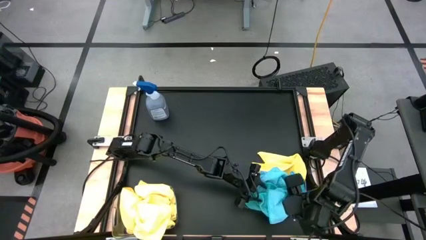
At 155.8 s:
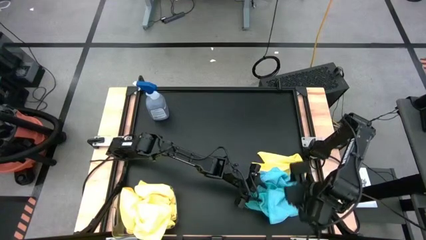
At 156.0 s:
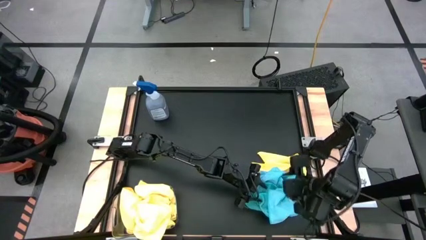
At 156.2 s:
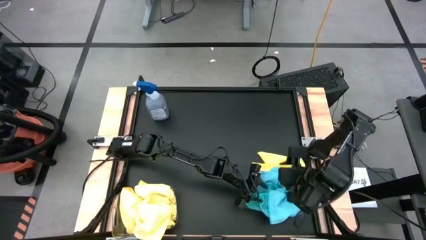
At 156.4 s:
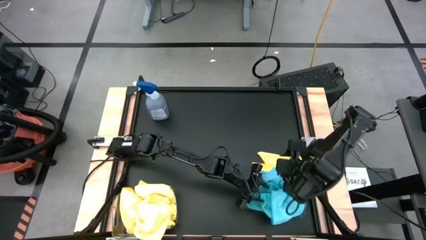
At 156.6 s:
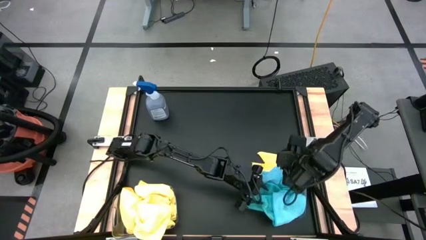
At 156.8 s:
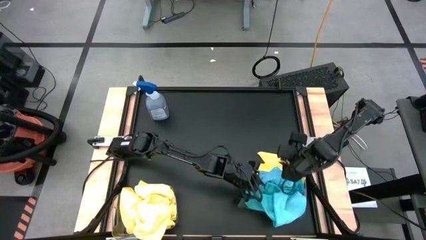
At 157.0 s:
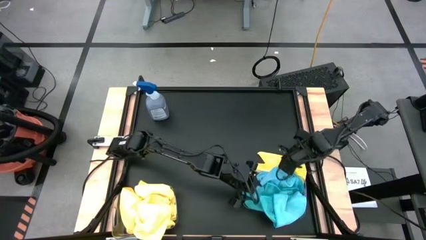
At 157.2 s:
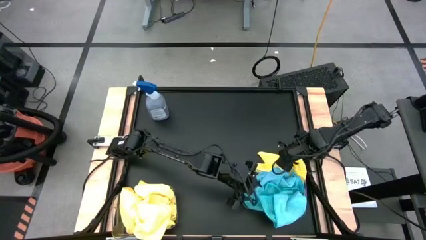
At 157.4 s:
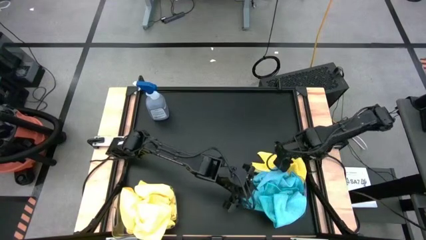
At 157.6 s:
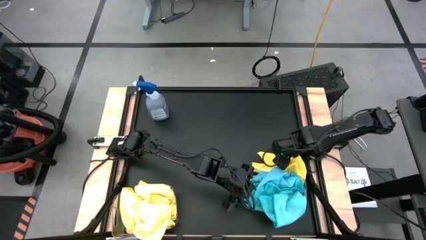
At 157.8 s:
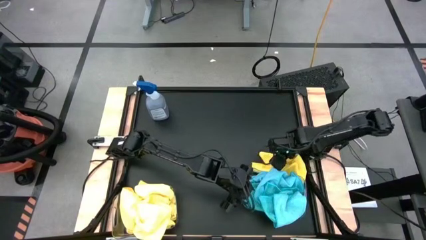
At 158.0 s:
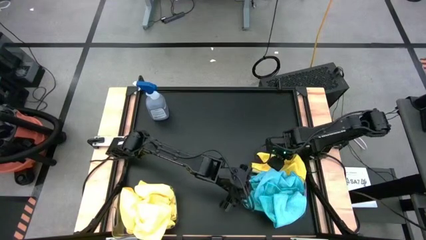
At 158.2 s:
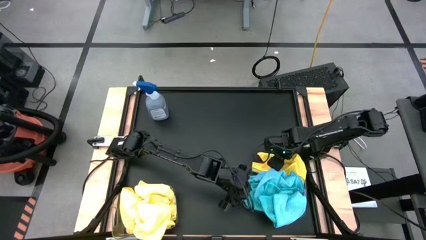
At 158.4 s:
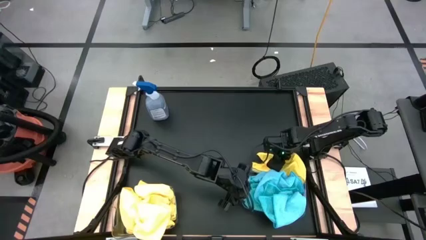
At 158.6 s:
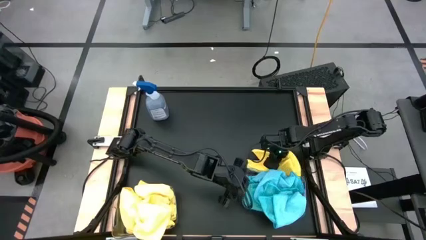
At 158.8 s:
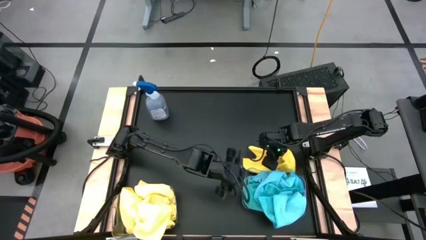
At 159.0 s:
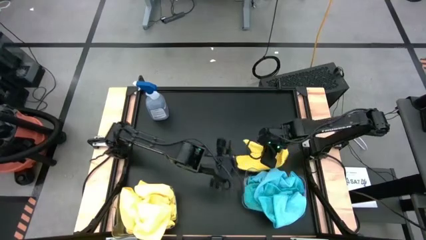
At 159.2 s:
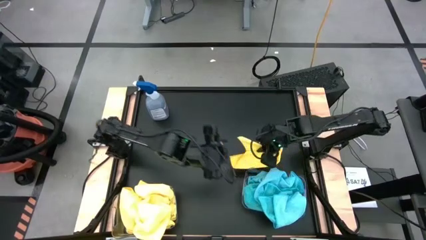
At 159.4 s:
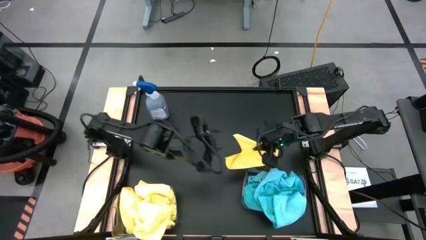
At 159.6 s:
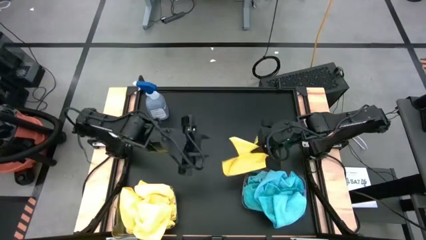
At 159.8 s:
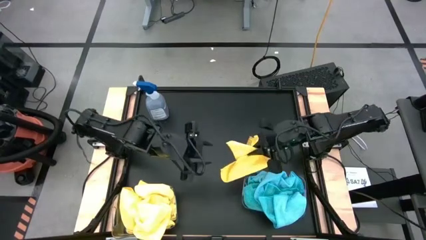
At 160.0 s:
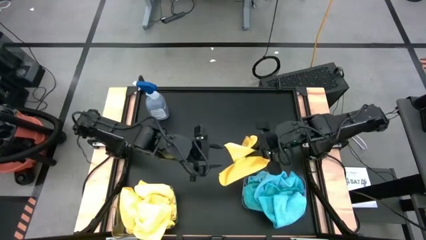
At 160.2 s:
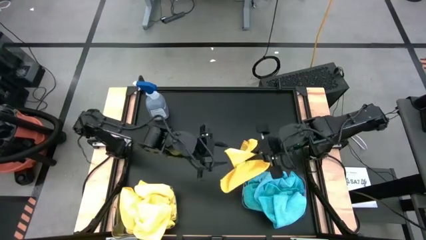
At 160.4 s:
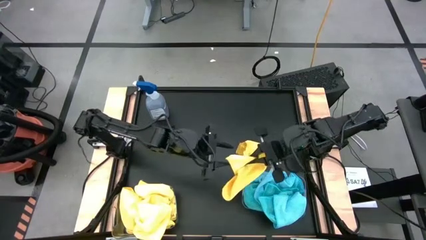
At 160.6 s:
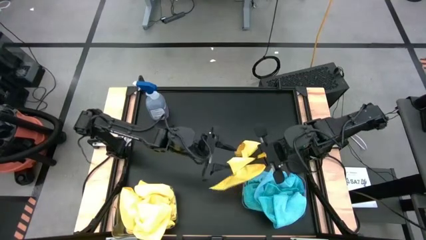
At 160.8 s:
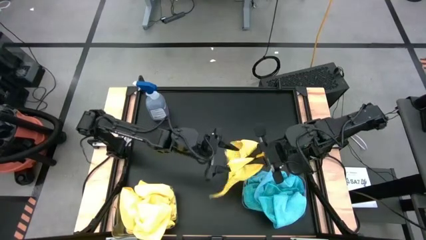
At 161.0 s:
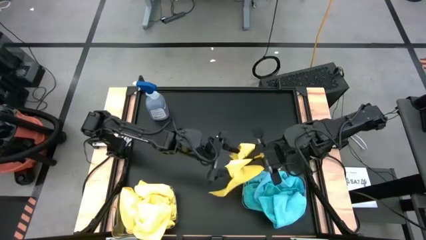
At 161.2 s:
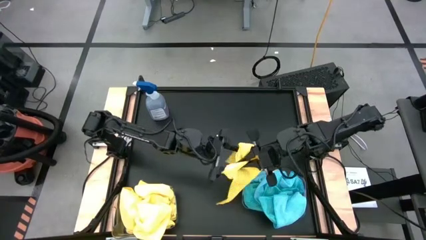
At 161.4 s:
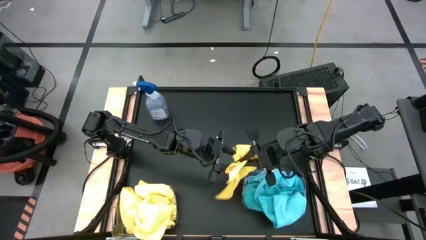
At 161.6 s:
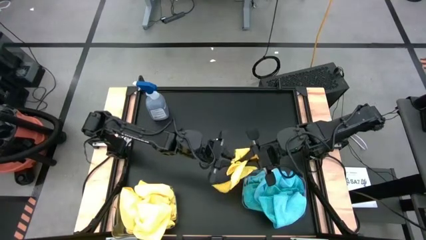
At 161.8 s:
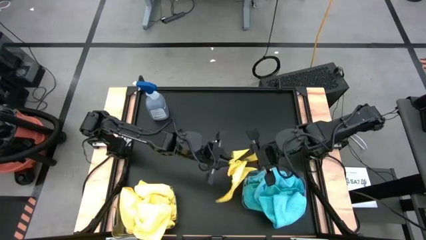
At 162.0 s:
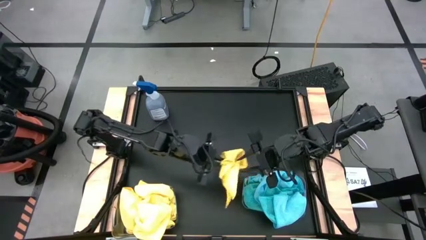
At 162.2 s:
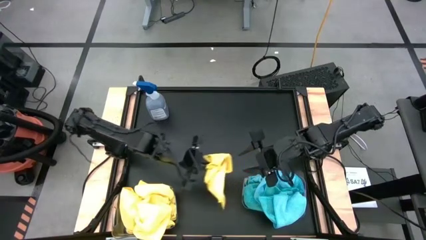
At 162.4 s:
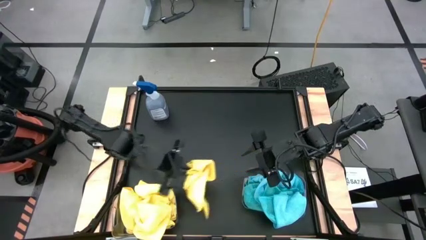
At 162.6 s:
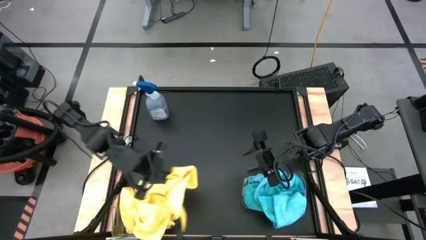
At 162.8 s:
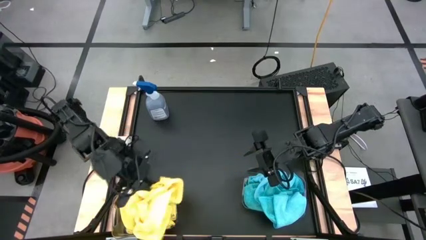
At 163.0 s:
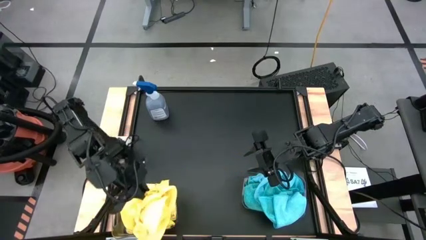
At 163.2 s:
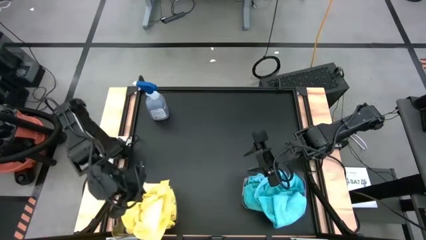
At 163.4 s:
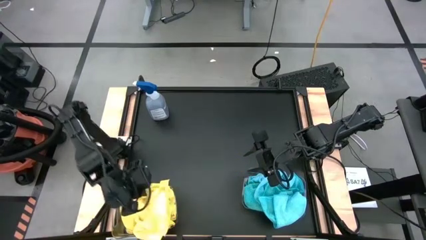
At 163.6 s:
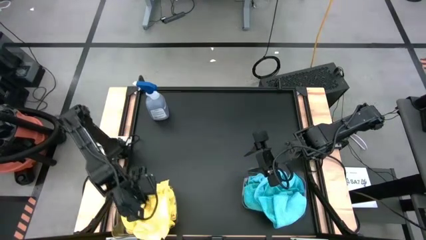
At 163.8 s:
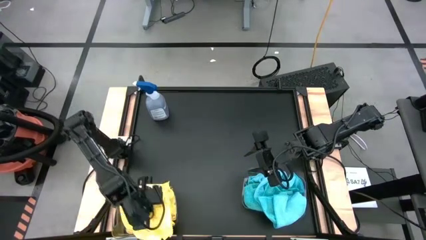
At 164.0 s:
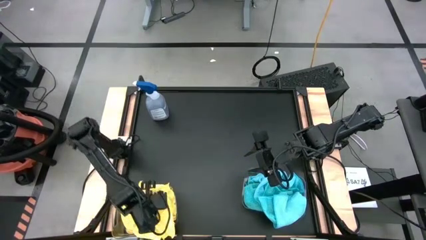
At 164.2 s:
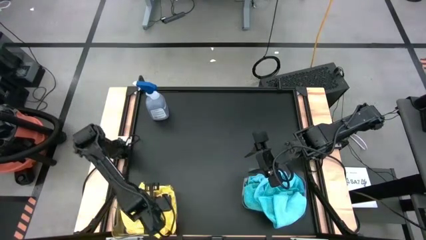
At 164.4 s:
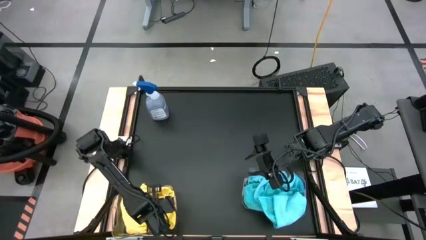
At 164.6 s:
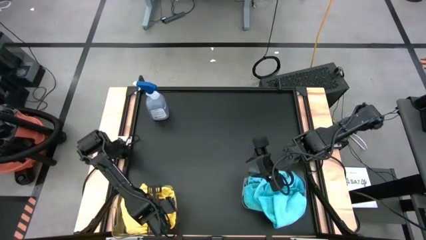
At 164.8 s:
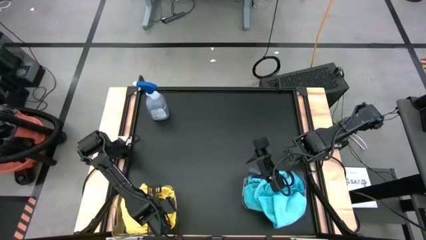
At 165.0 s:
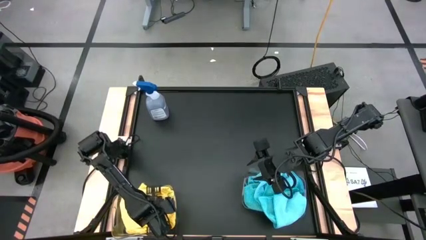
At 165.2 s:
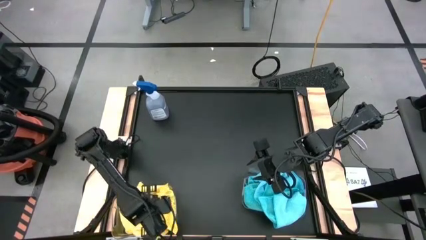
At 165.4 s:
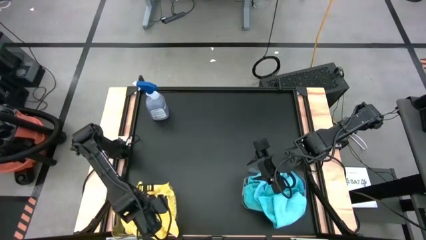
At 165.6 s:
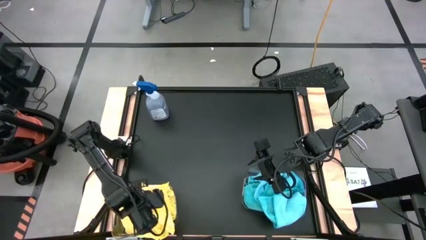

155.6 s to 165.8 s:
Task: Sort microfiber towel by color & place in baskets
Put the yellow towel into the left transparent bin

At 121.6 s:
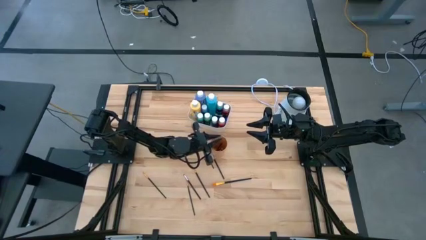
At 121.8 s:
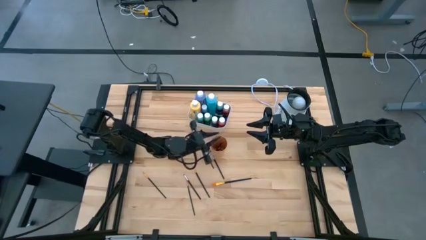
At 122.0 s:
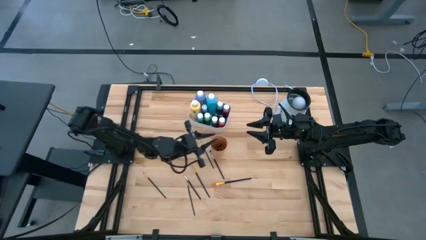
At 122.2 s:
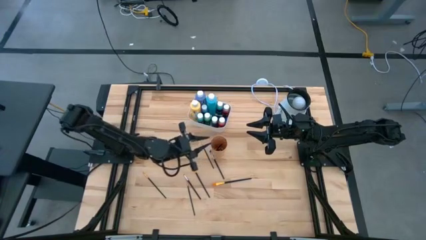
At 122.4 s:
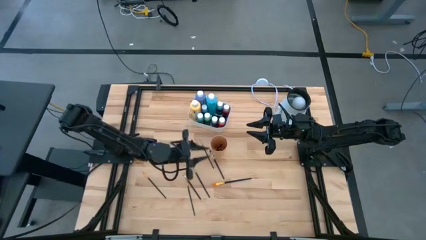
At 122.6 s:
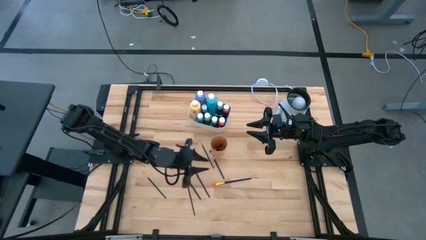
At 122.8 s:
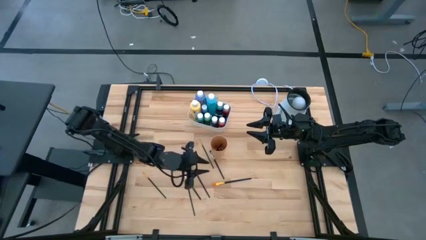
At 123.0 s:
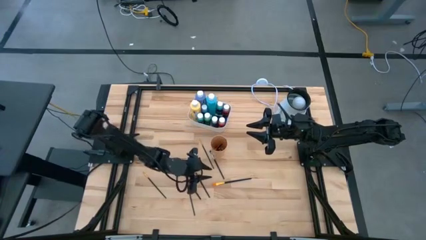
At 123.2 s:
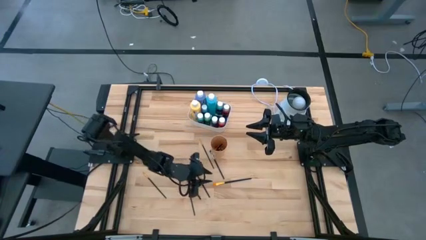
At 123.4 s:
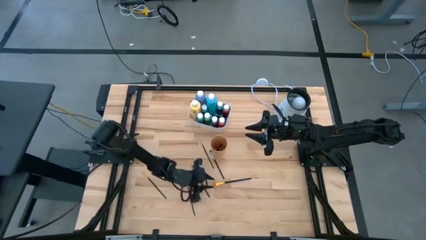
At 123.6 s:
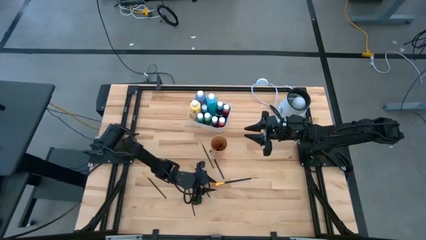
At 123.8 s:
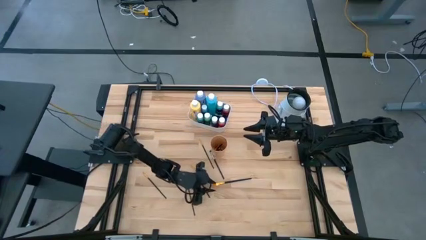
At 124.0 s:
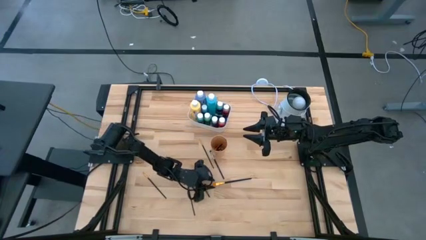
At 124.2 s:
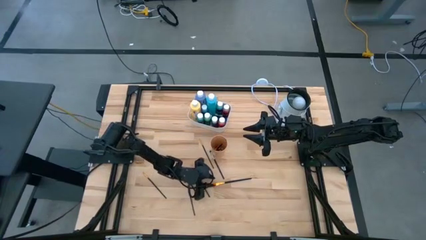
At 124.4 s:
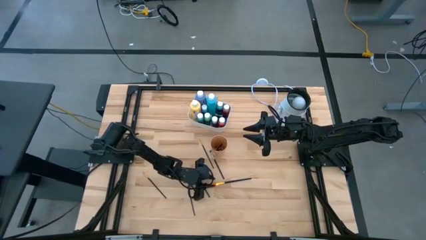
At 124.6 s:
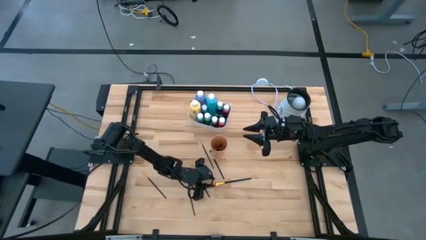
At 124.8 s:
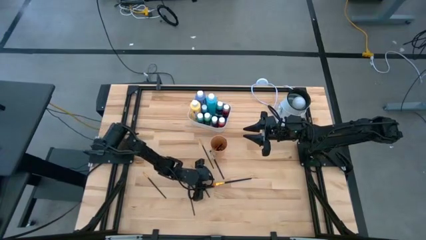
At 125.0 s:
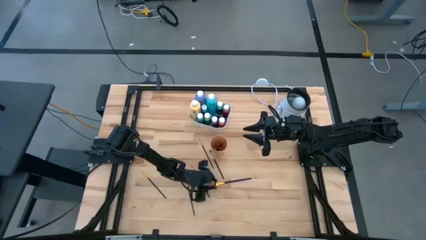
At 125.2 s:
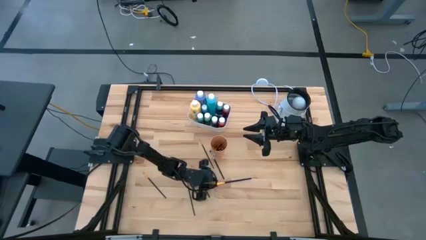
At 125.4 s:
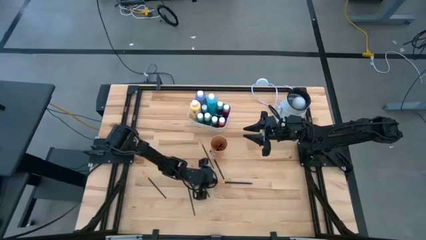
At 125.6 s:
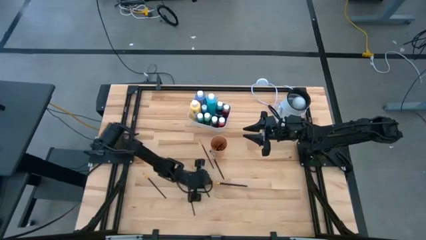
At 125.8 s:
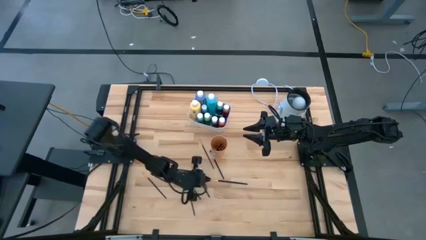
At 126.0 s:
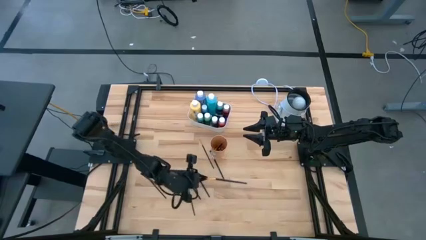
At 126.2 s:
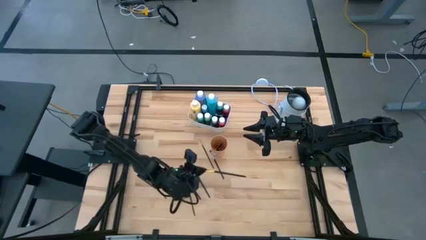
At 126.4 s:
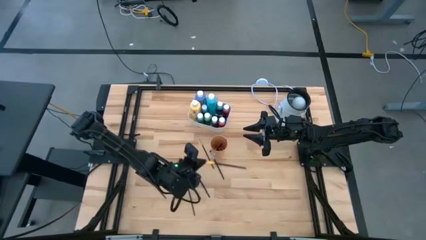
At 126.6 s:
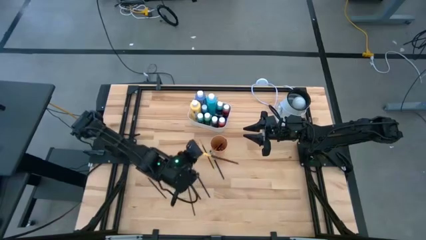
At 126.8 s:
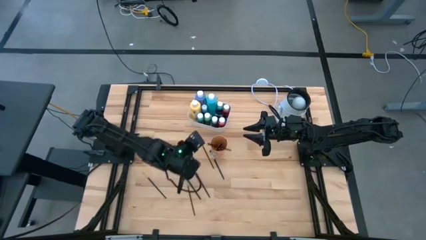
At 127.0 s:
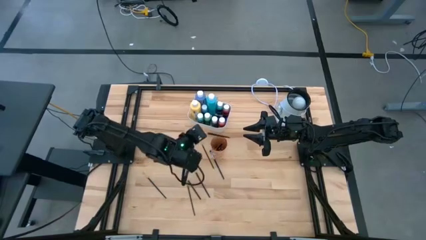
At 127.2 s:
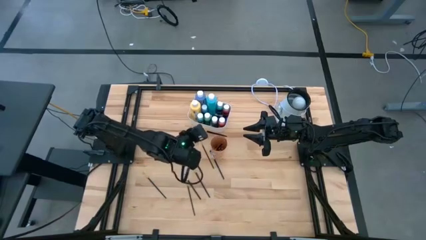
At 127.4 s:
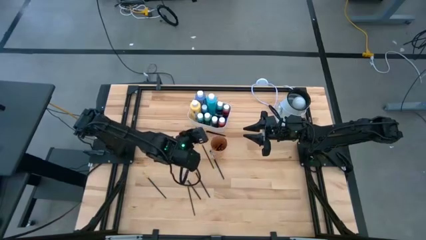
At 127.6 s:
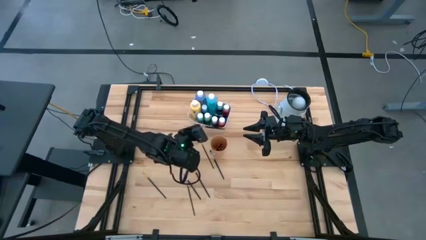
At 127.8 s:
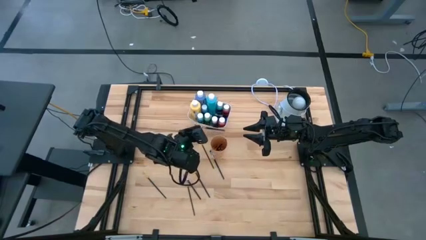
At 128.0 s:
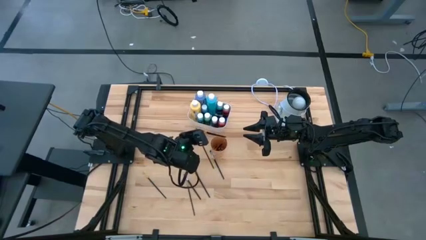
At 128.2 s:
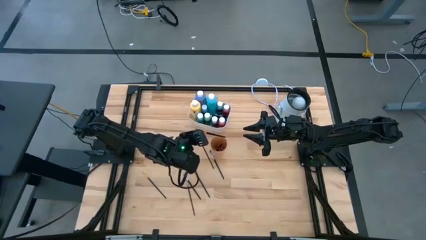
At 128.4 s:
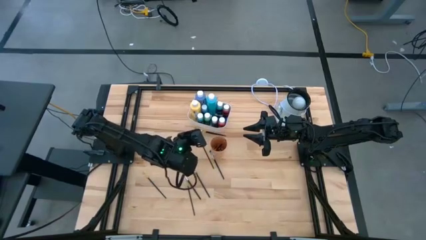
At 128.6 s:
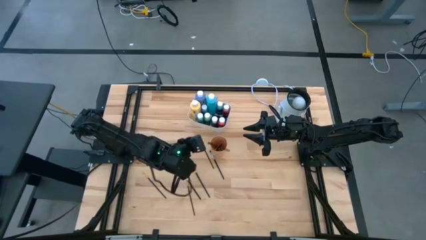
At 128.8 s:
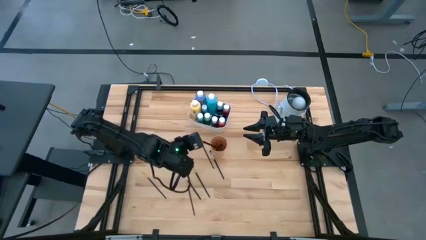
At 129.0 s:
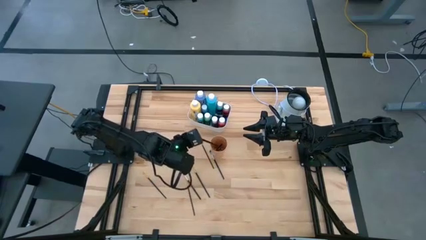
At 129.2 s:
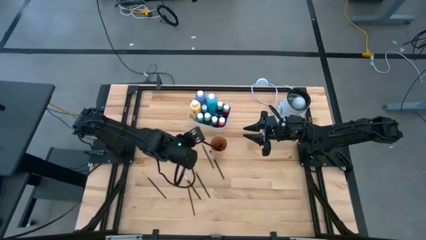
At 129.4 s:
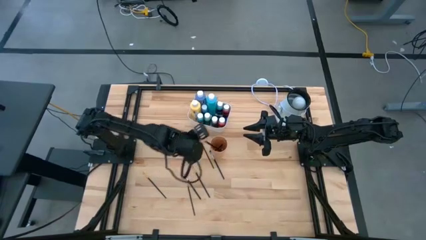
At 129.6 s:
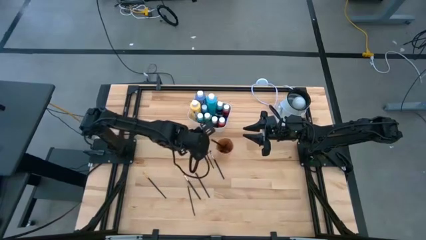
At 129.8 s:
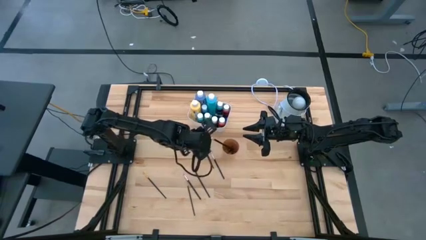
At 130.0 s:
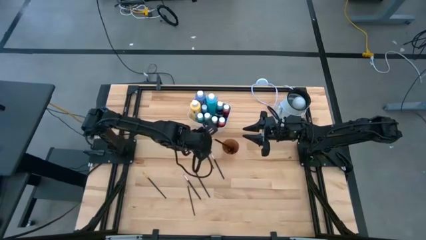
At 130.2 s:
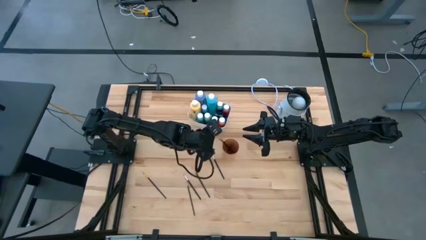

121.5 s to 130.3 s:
Task: Pick & Place Paint Supplies
Put the black paint brush into the orange cup
